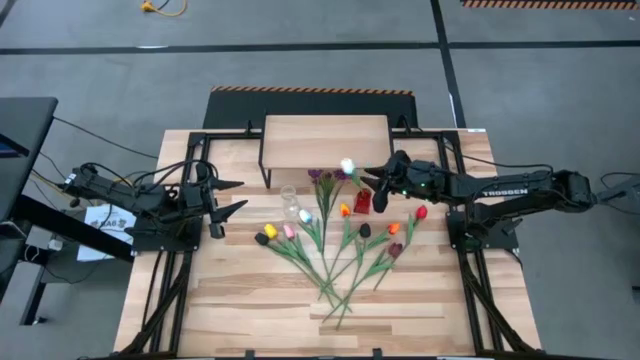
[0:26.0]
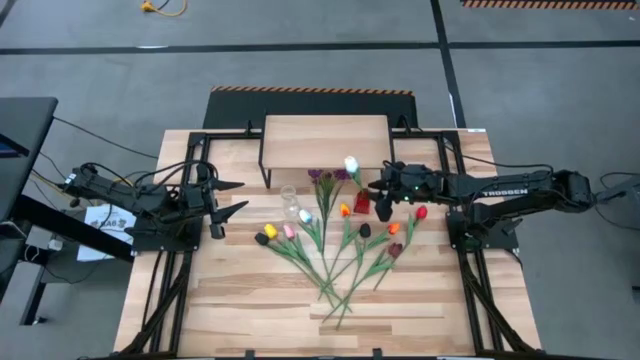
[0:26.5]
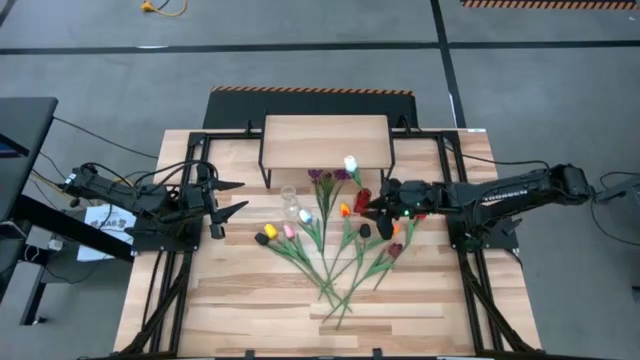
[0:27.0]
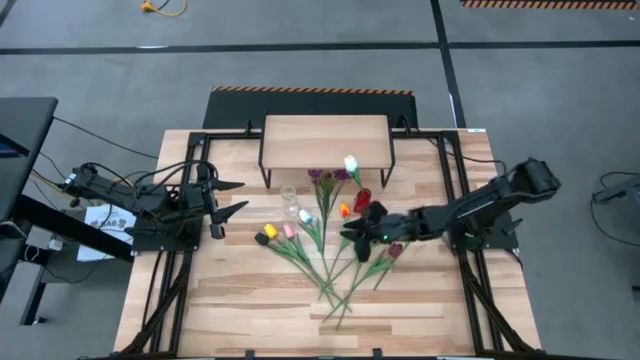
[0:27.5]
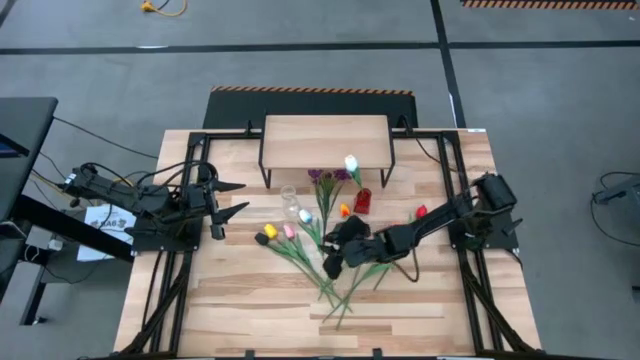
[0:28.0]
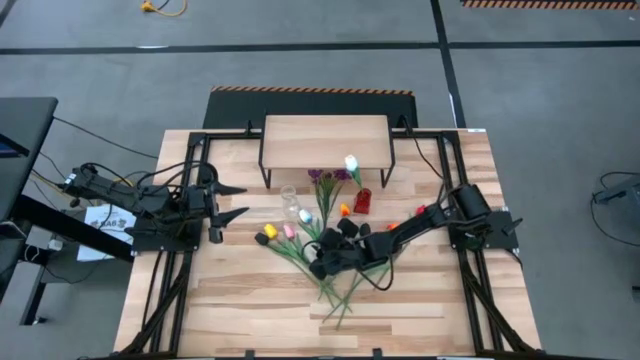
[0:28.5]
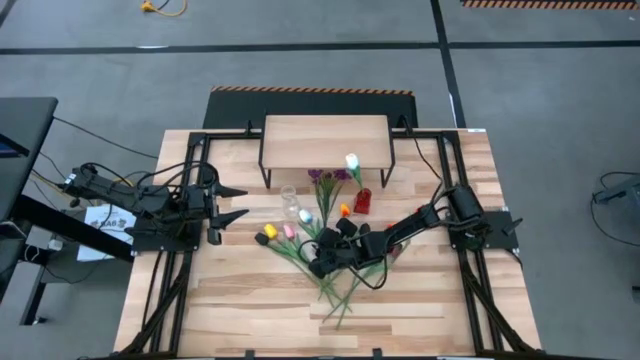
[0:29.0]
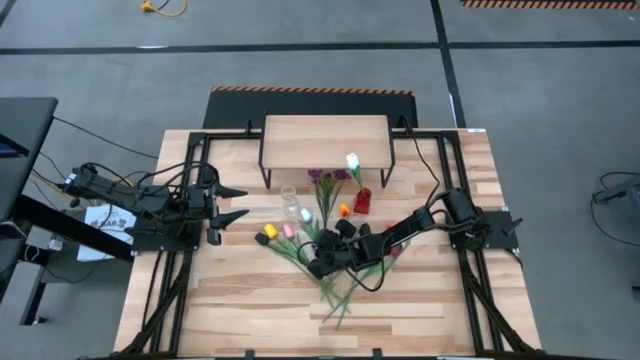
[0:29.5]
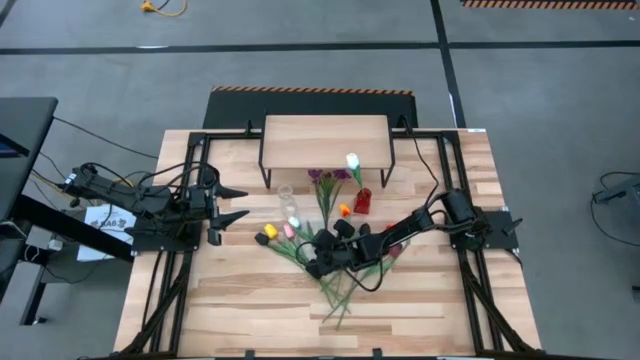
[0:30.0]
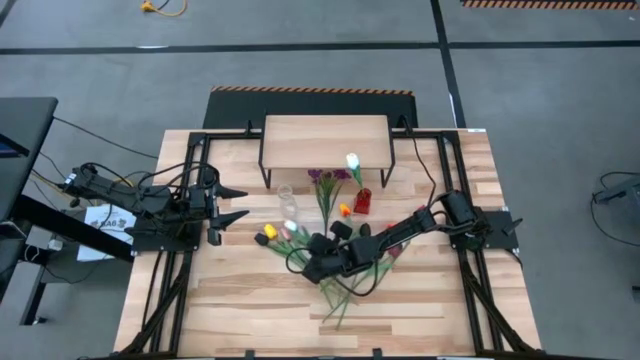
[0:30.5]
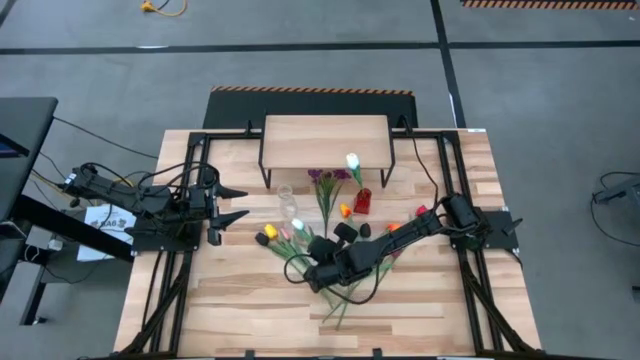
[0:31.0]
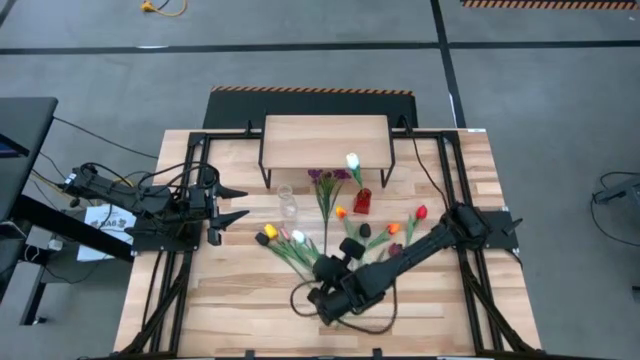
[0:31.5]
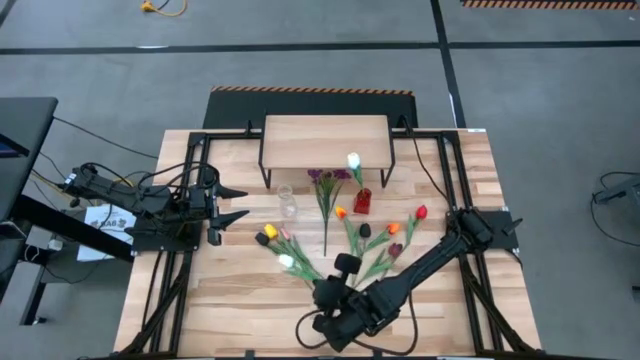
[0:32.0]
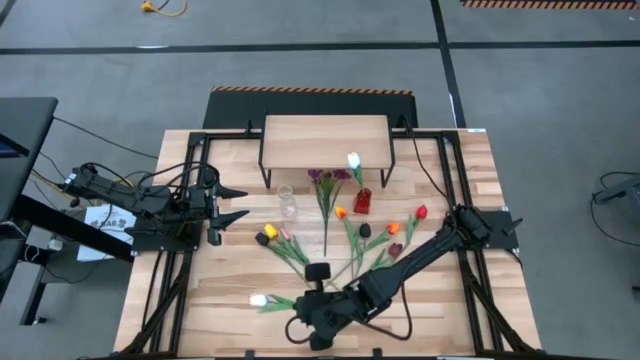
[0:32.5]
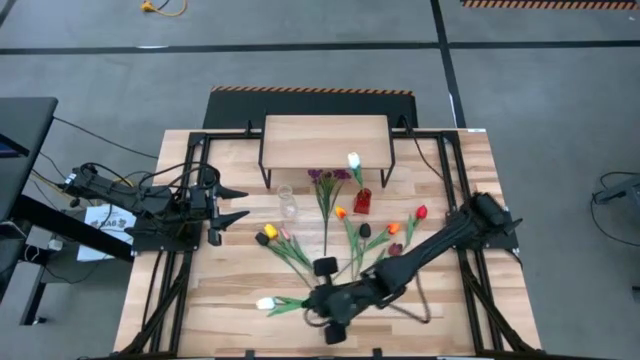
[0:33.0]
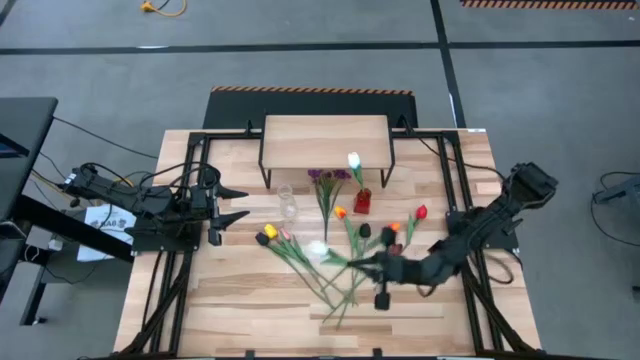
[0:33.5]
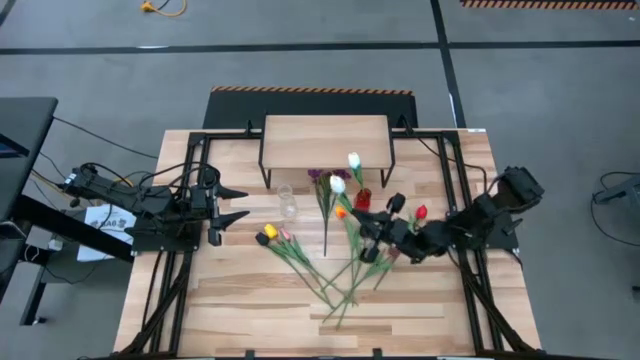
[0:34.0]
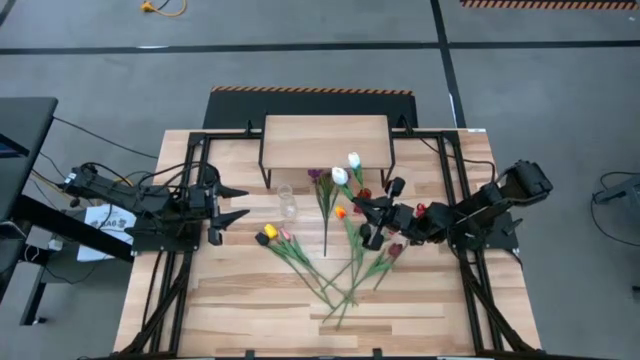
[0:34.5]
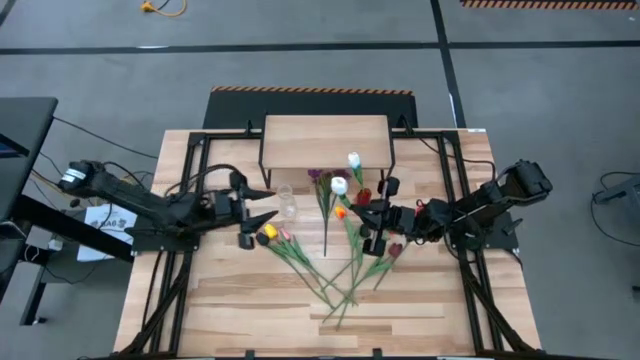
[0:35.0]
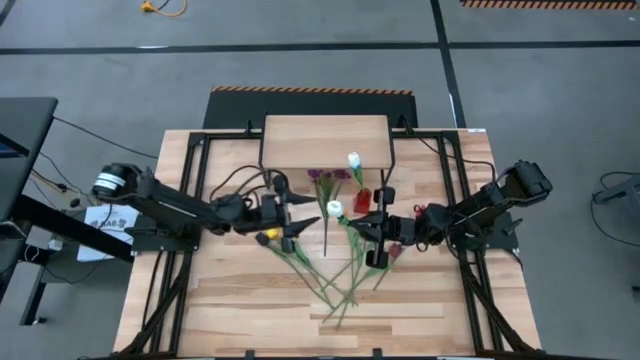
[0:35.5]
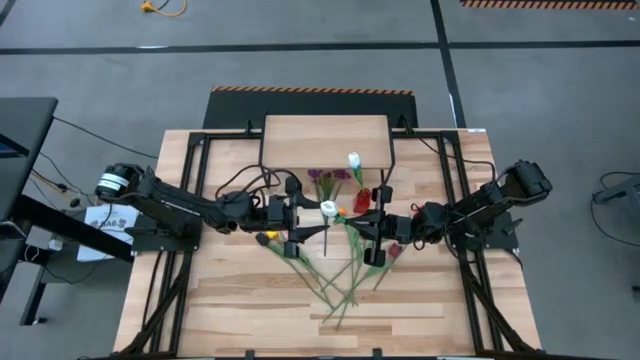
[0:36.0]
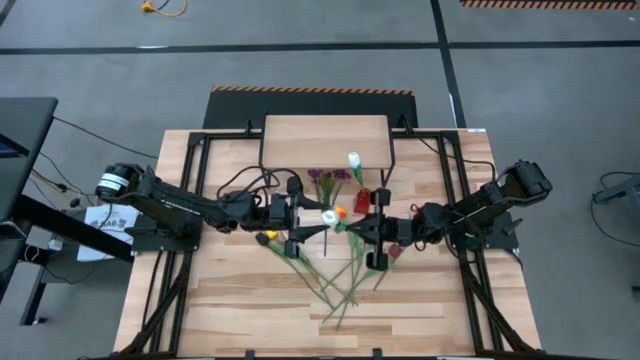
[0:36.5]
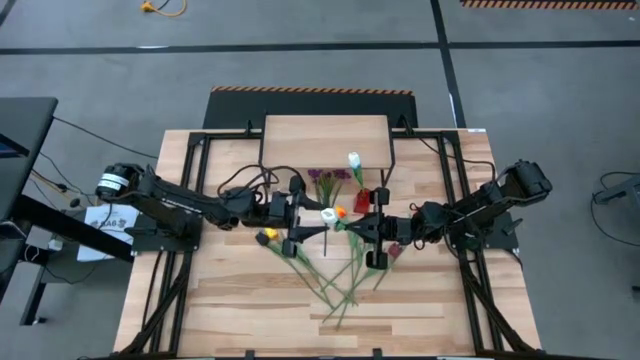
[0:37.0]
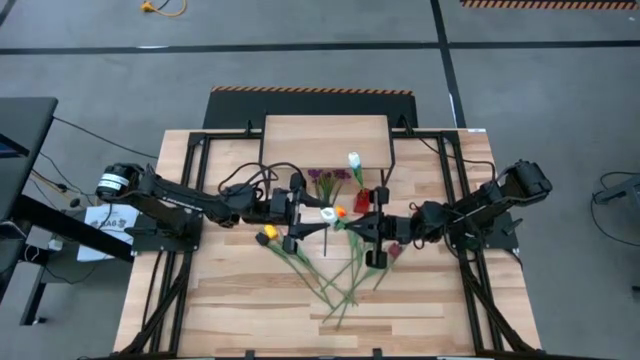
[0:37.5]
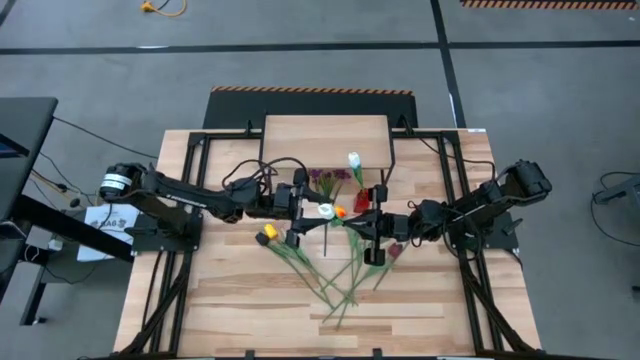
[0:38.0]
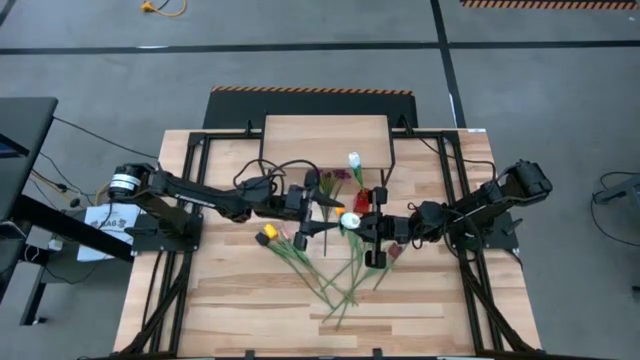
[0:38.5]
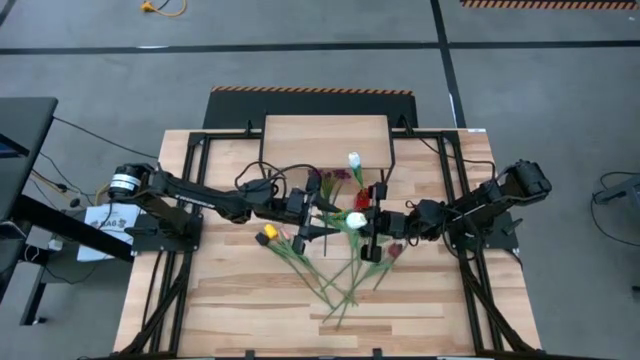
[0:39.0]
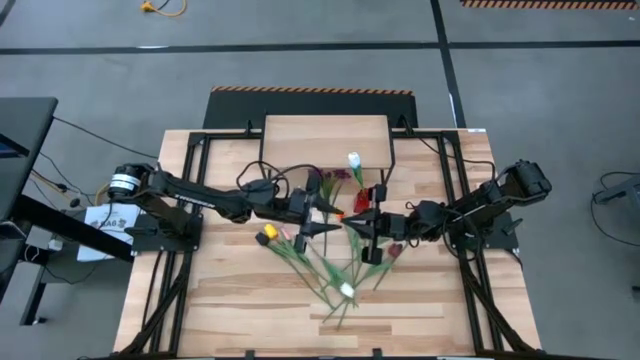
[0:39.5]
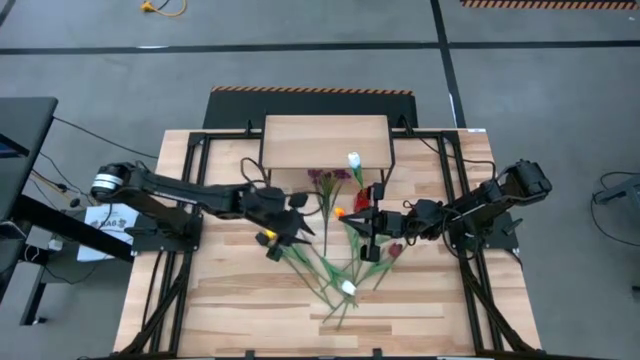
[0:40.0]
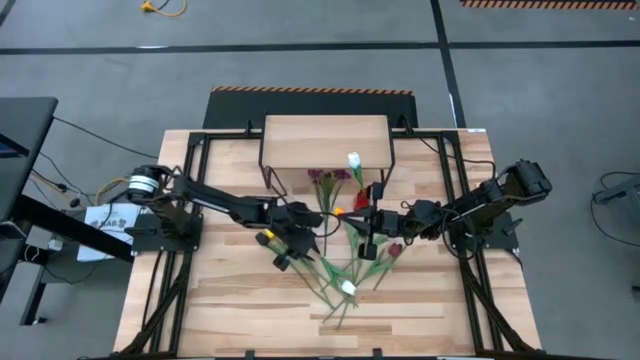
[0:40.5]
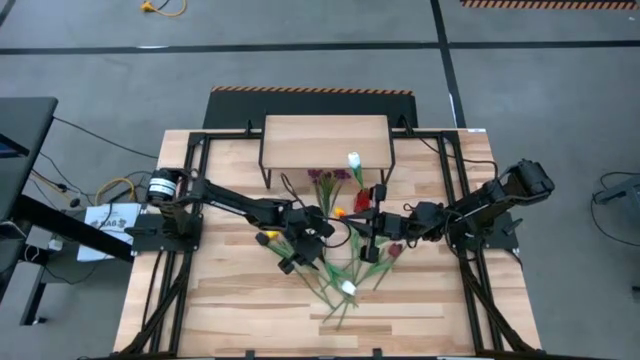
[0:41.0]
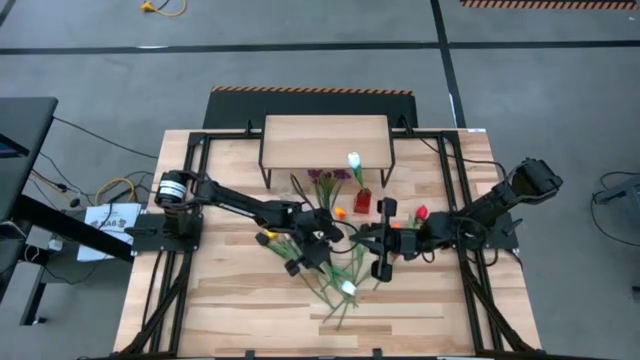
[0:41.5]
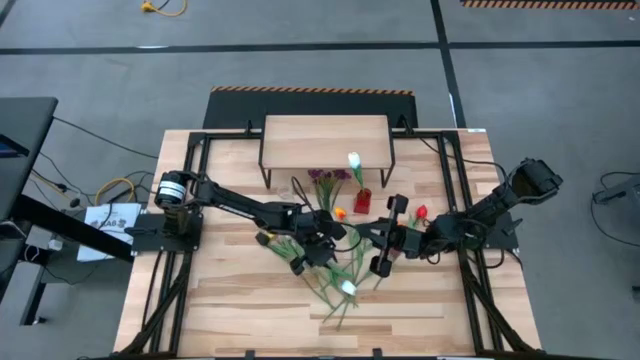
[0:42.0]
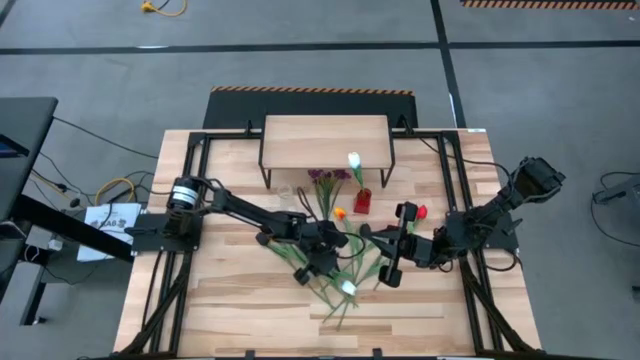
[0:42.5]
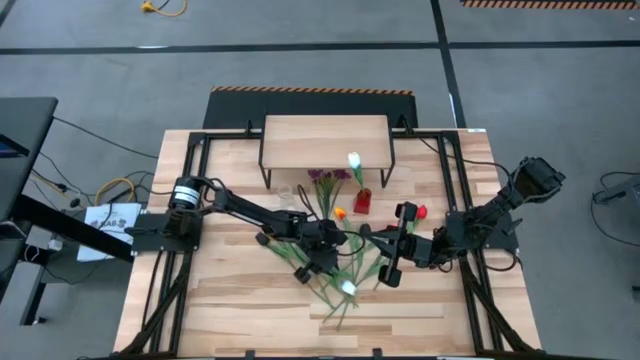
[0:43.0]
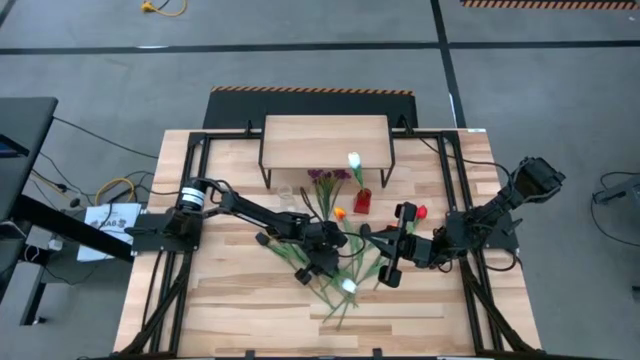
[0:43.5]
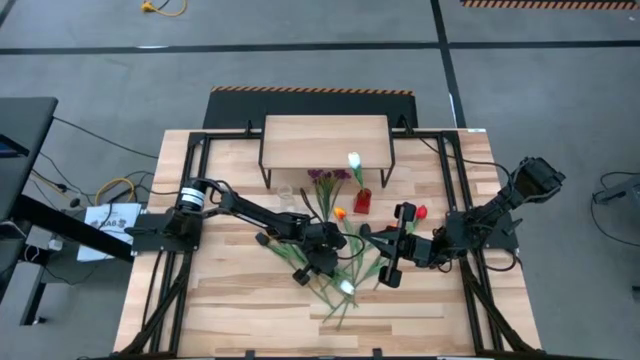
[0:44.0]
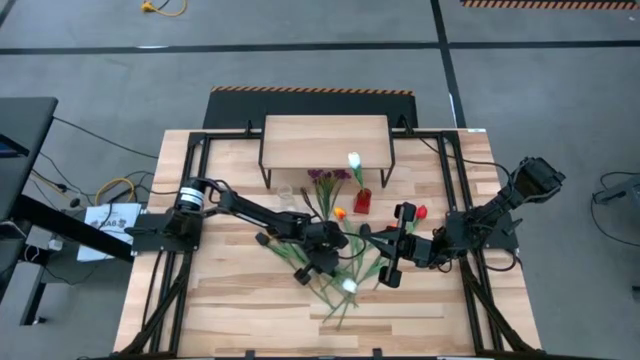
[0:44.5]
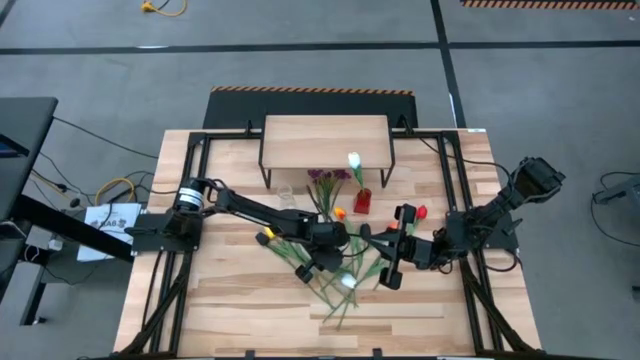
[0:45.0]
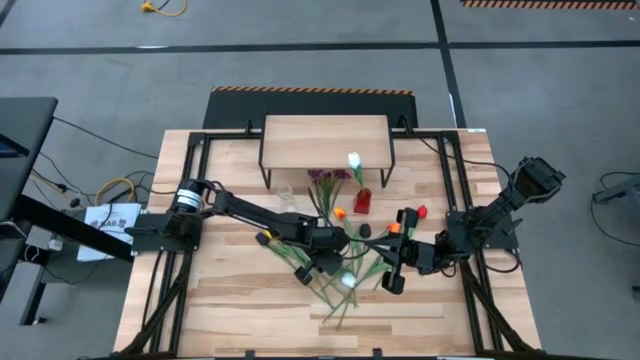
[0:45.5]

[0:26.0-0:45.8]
Task: Pick and place flowers into a vace then onto a shelf
Put the white blue flower into the red flower vase

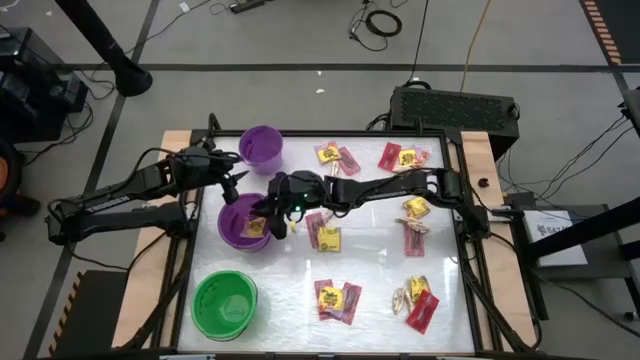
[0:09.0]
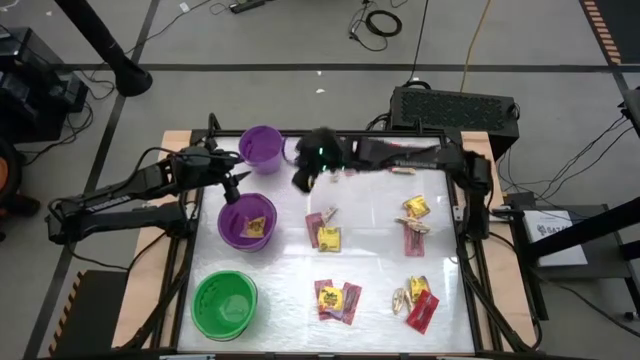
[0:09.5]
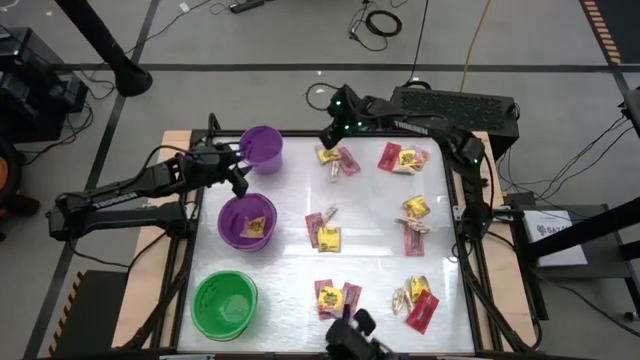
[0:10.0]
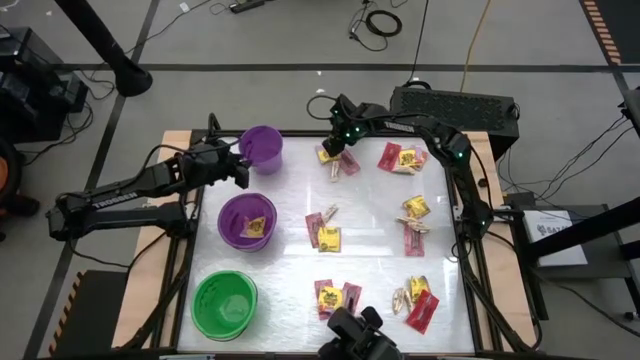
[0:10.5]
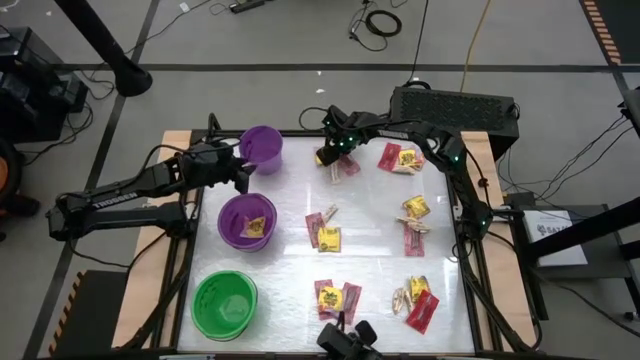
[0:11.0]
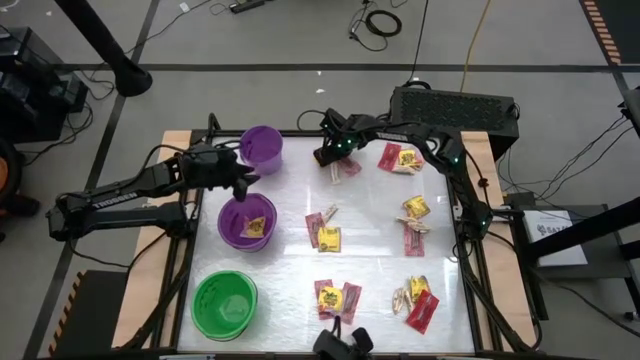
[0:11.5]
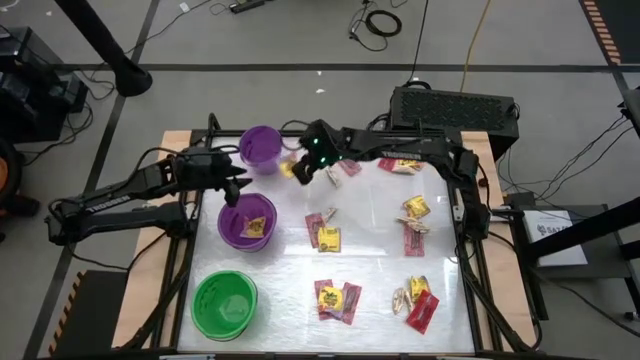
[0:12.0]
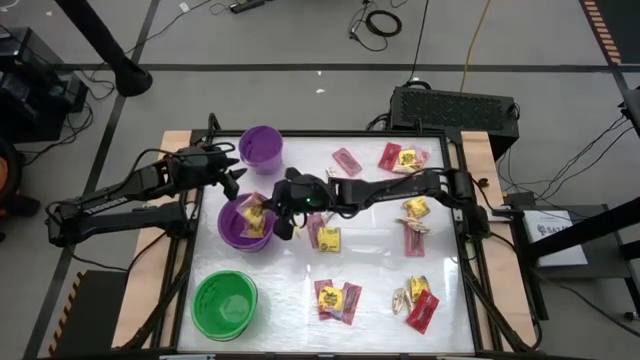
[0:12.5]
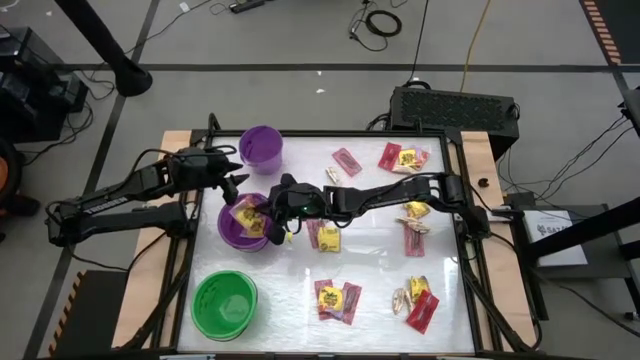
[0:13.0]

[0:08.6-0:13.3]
Task: Sort candy by brand, put in halloween buckets
Put the yellow candy into the bottom purple bucket
